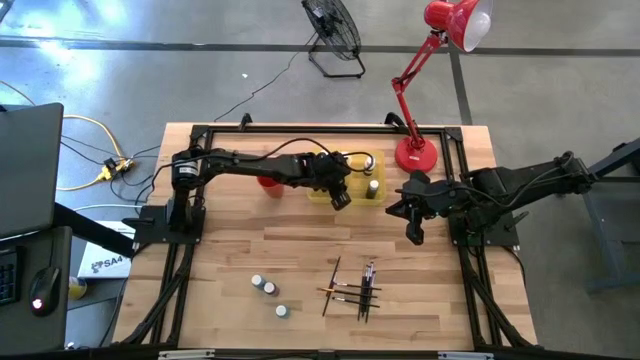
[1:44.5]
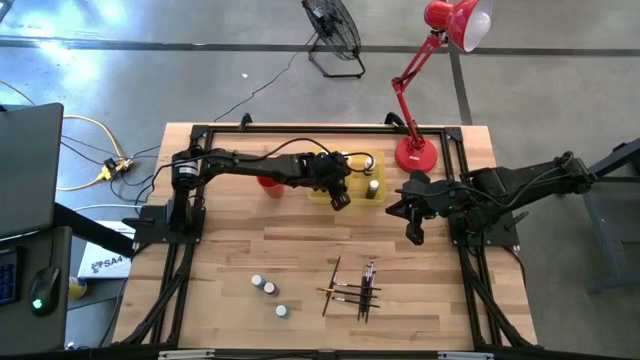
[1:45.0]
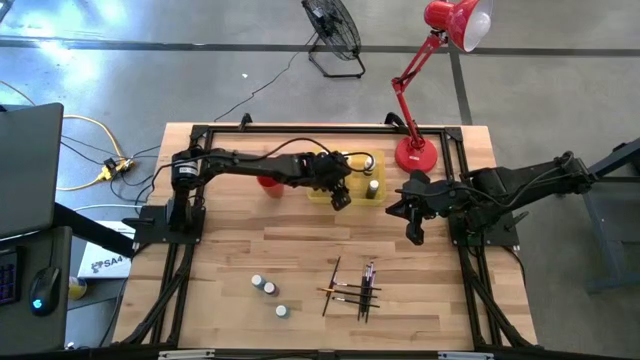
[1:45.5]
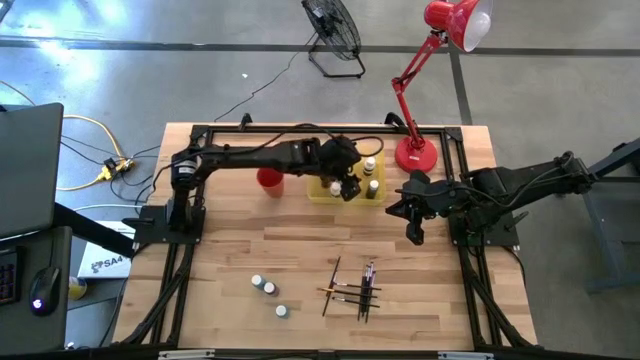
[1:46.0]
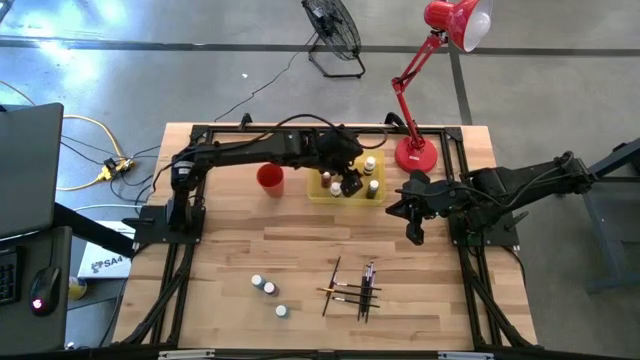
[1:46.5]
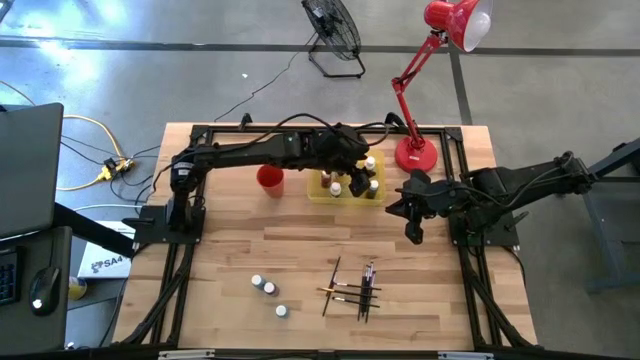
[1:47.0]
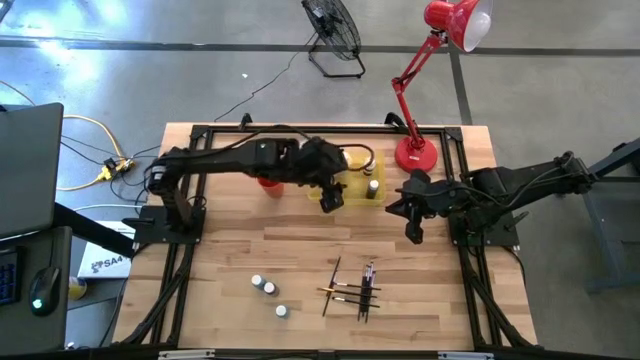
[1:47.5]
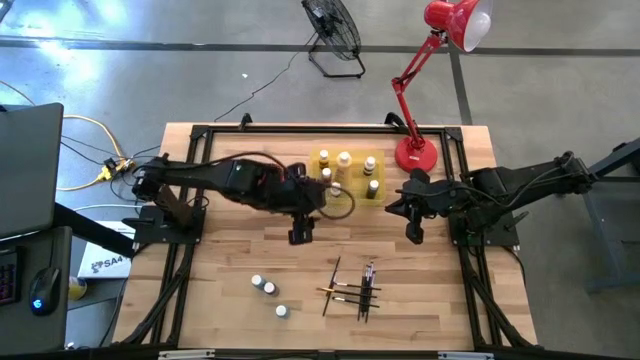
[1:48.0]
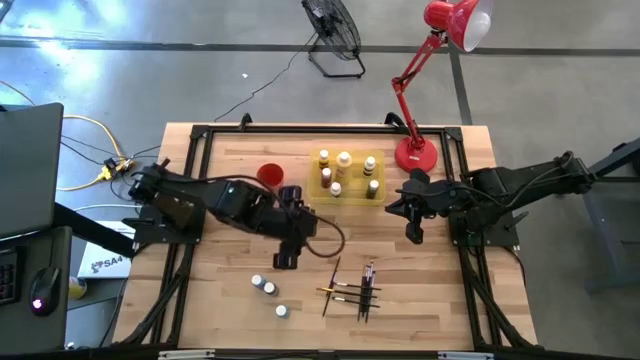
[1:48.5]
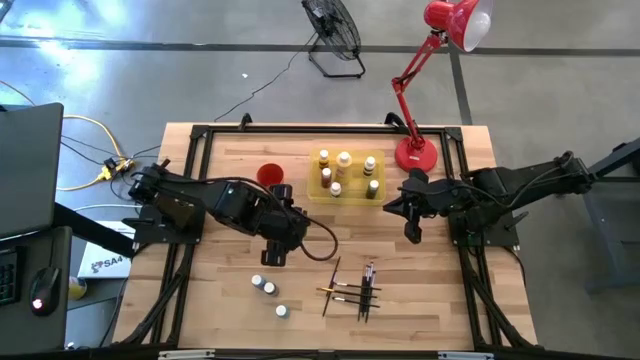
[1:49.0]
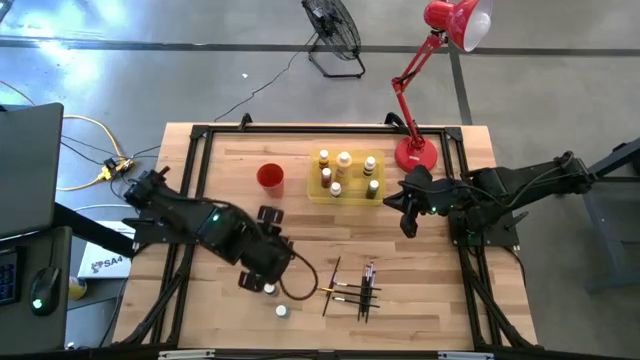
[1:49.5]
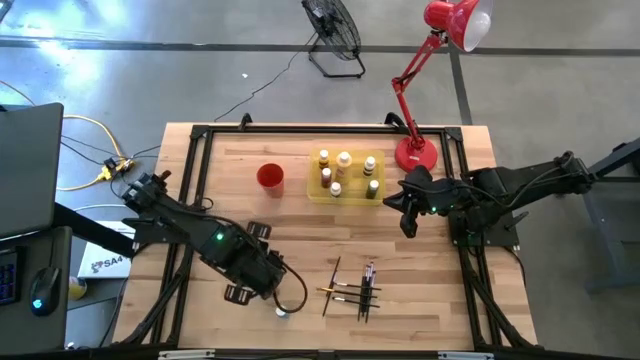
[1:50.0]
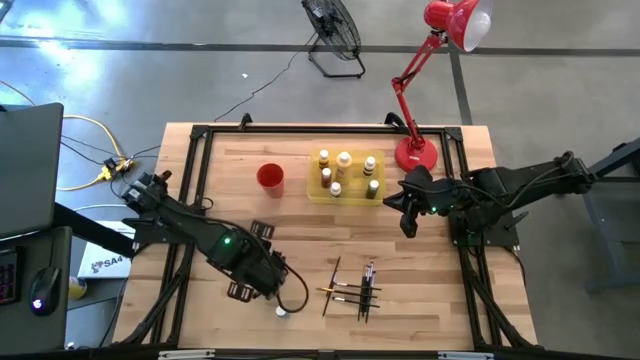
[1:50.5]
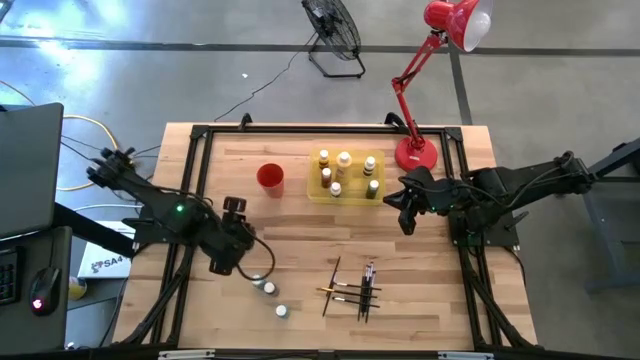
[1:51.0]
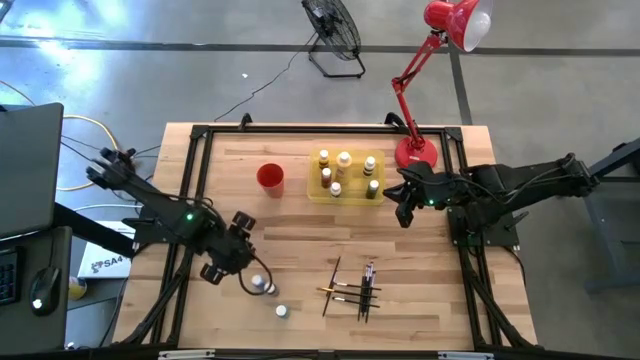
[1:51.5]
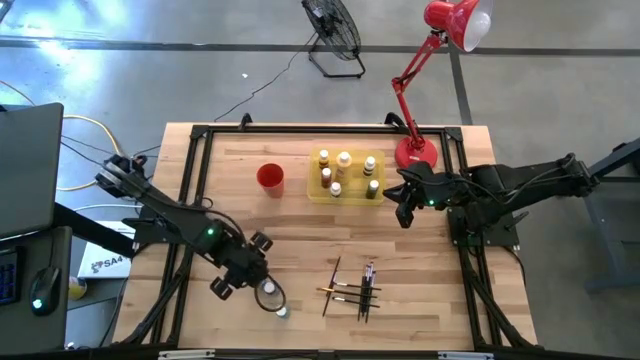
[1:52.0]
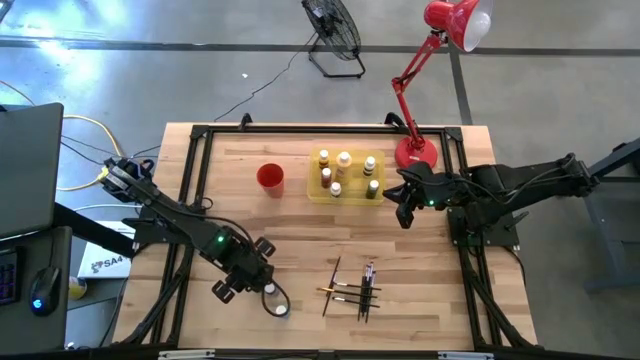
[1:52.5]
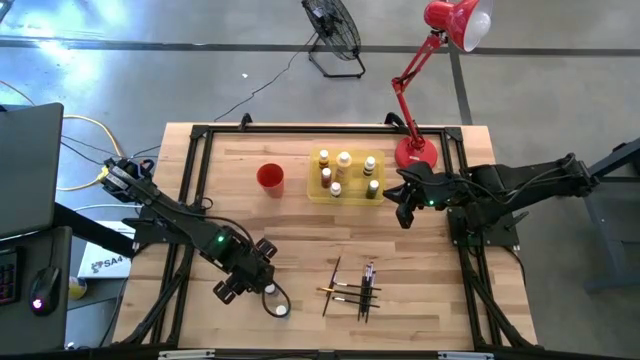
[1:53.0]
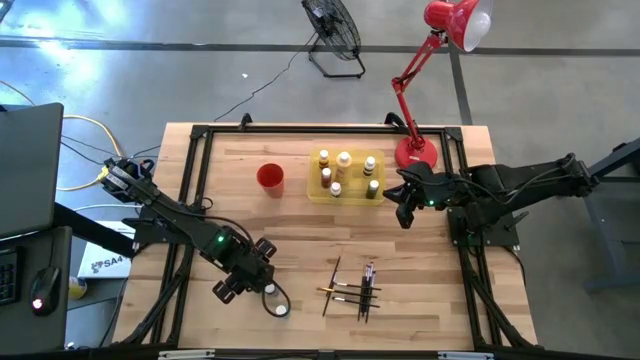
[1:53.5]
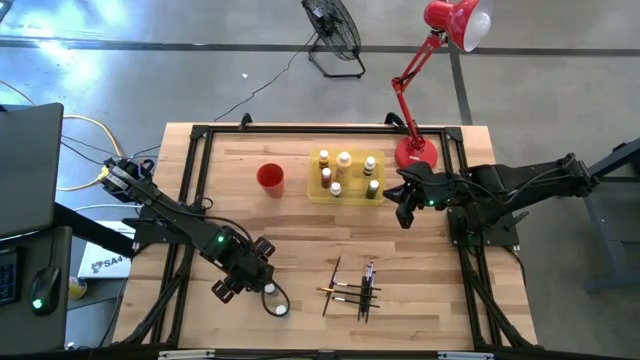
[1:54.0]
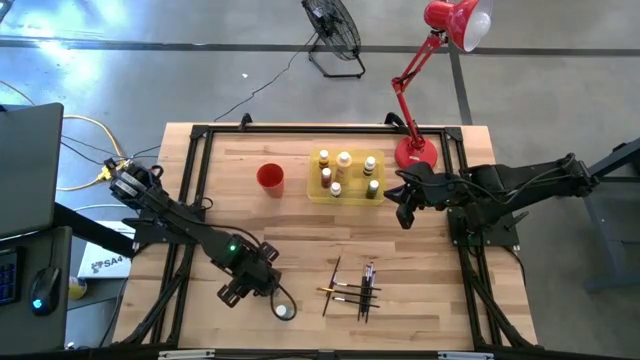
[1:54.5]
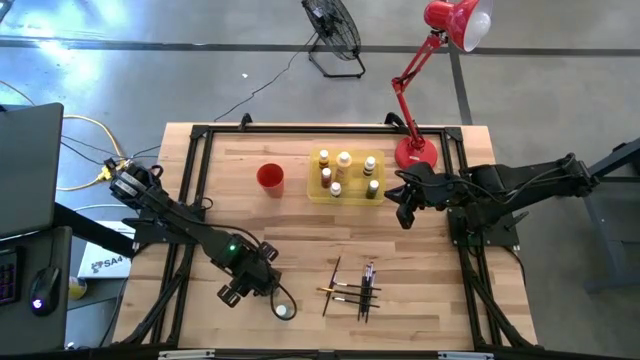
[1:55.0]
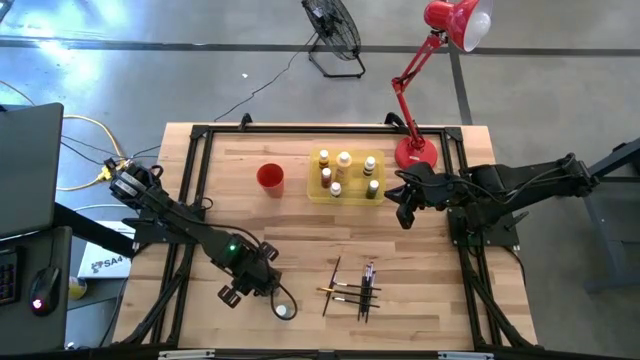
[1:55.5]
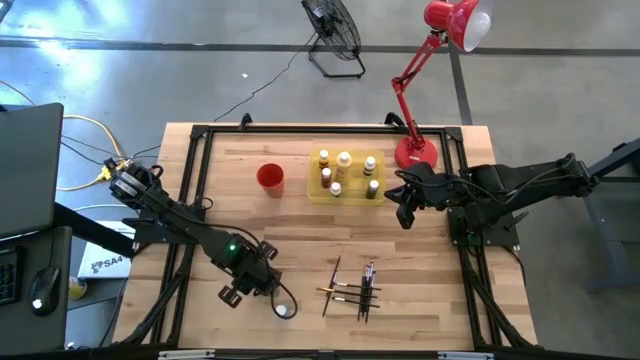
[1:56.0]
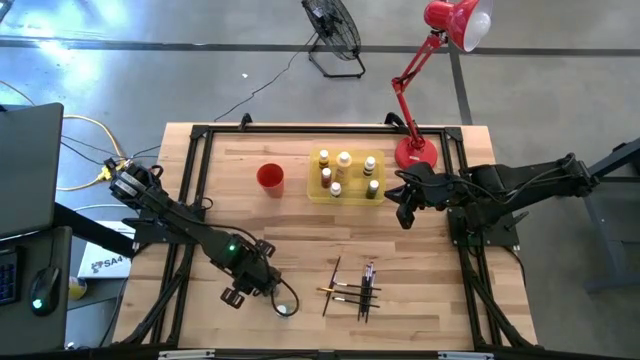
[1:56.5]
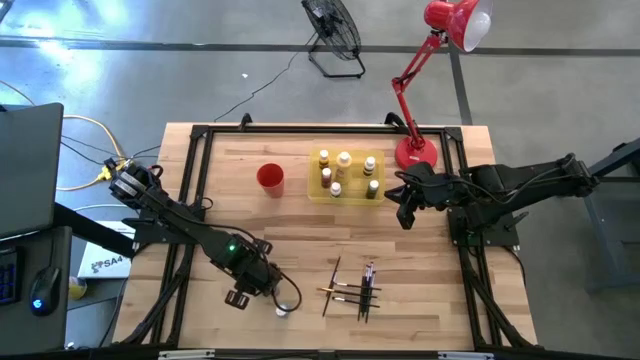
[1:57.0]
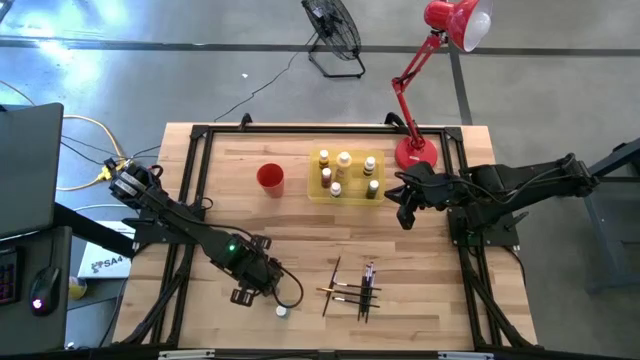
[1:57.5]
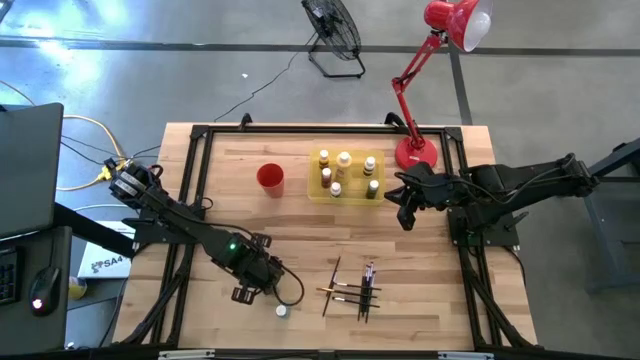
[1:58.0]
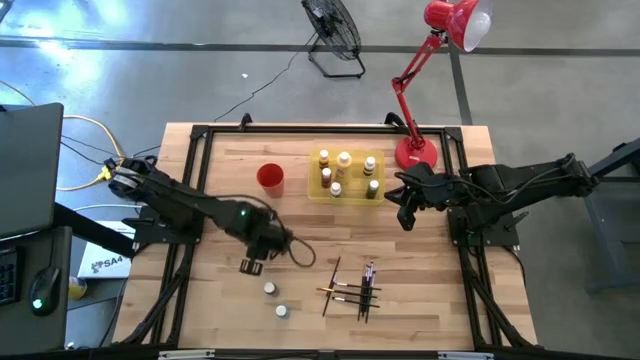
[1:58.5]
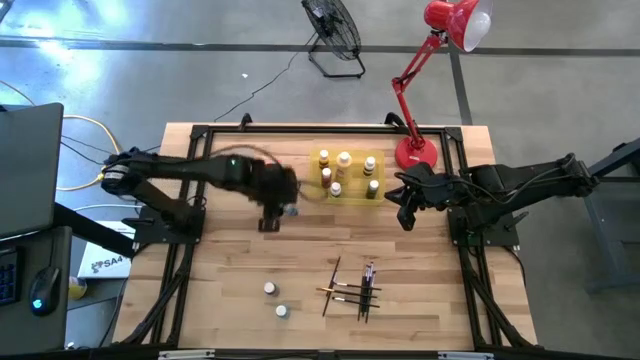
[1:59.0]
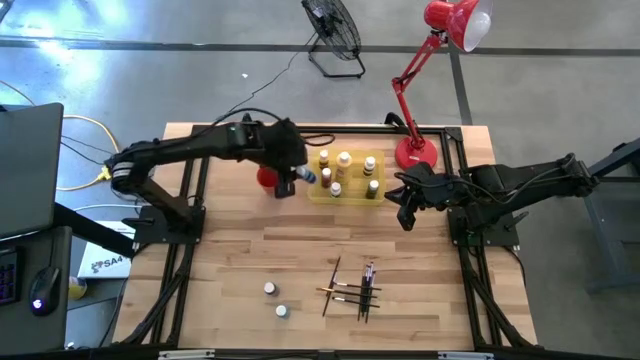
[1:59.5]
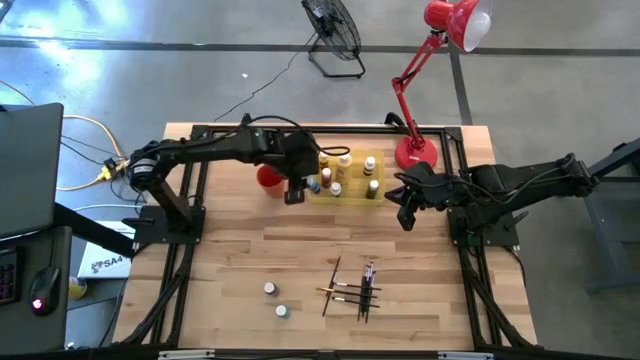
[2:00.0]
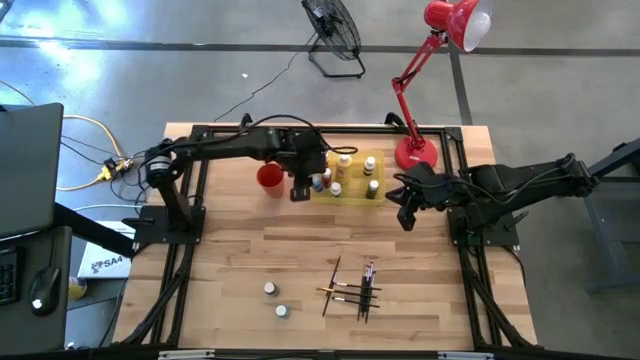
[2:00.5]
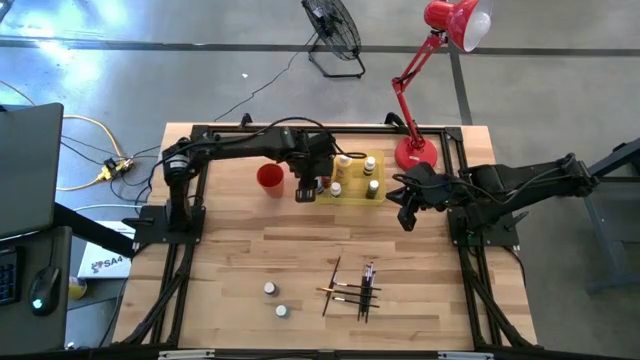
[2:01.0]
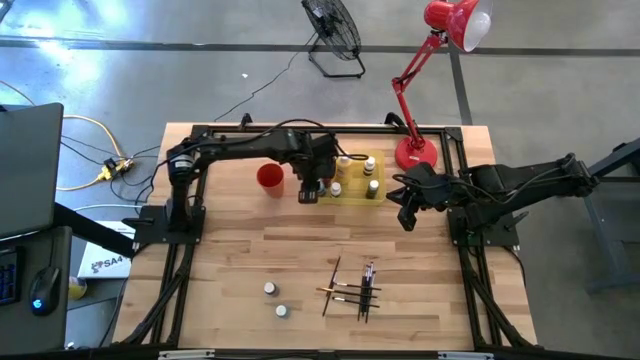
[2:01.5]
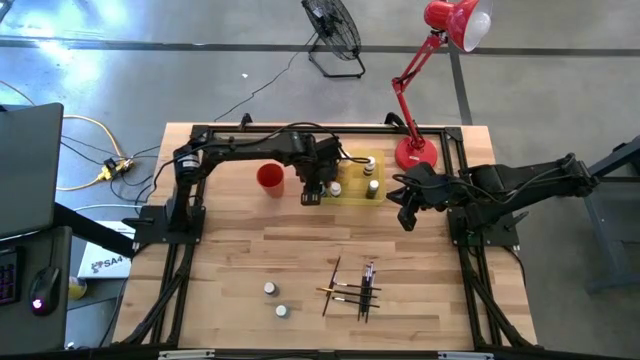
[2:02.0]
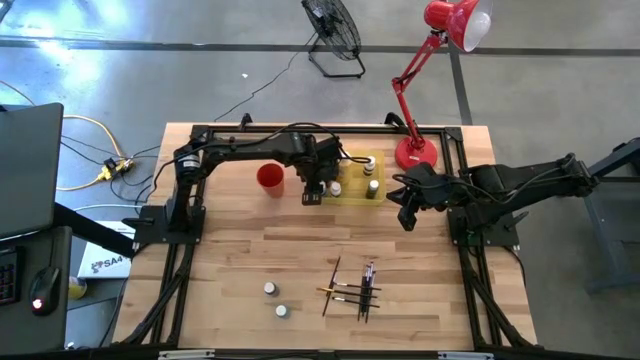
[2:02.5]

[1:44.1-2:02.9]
Task: Pick & Place Paint Supplies
Put the light blue paint bottle into the yellow bin

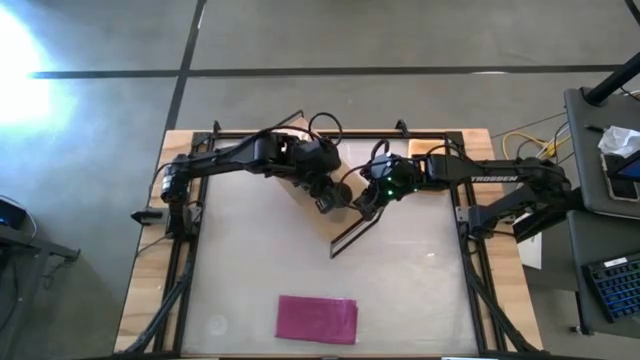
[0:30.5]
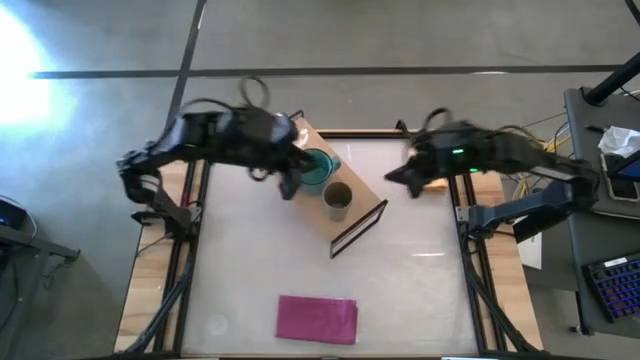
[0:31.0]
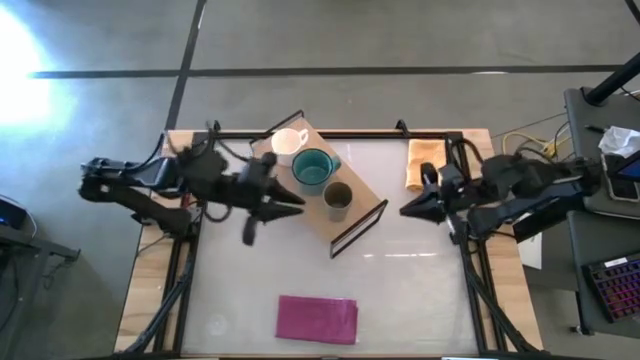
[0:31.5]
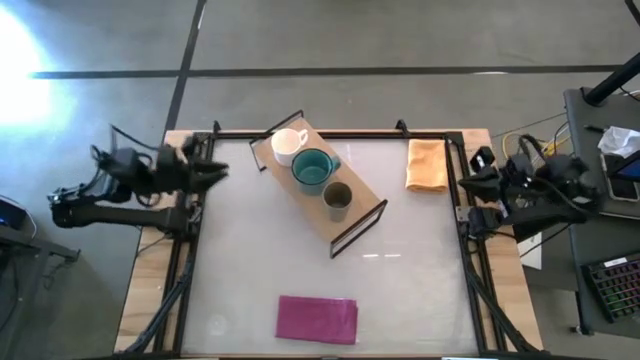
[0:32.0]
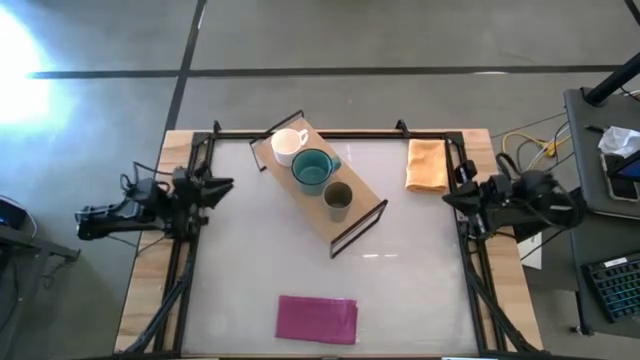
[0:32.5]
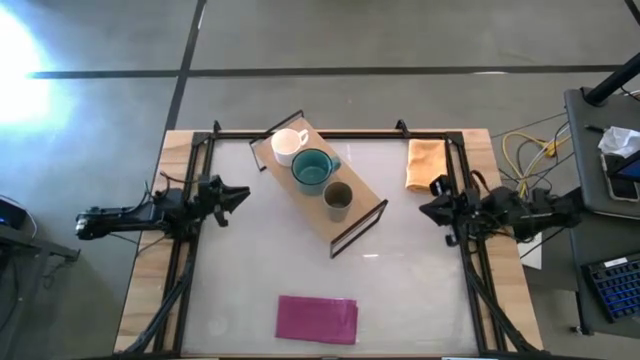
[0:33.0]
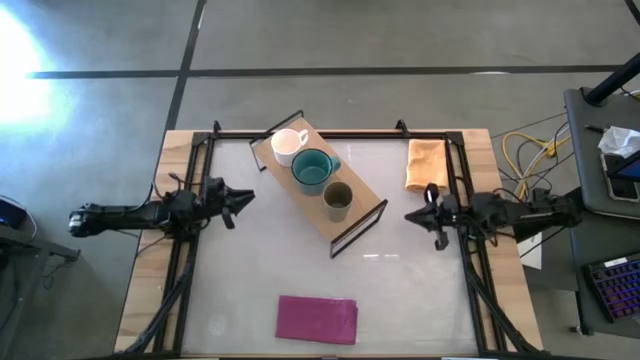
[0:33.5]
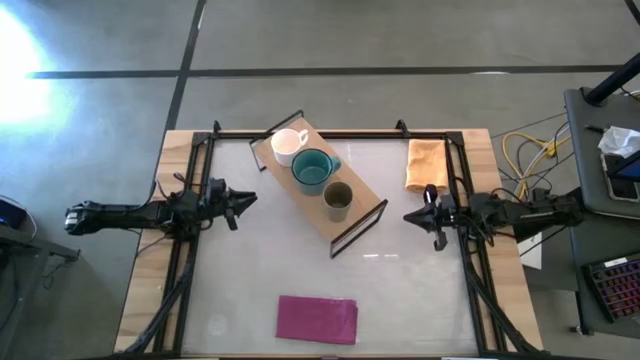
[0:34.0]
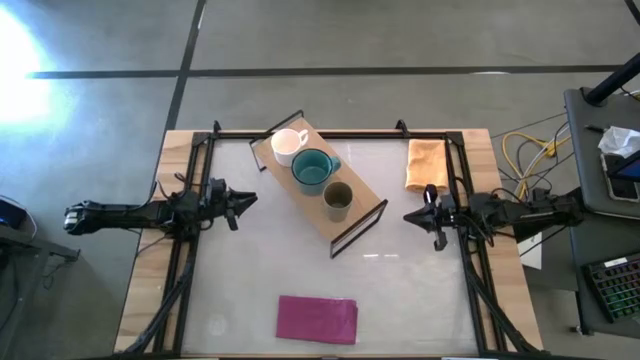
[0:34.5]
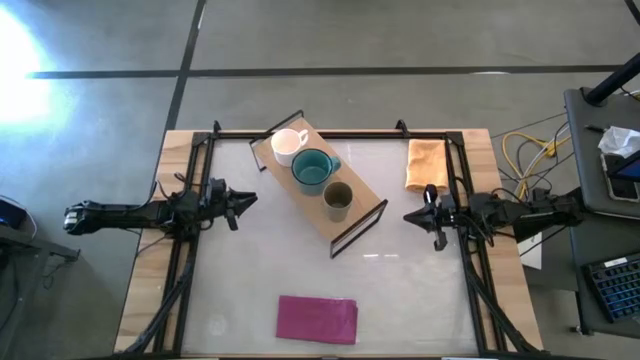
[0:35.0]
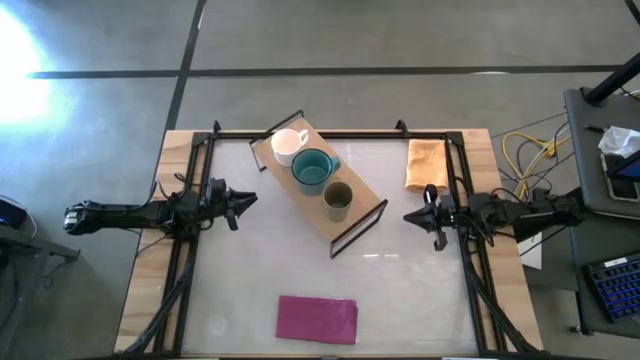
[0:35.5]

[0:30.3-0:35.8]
Task: Stack small to large cups/mugs on shelf
Return to Home Position
